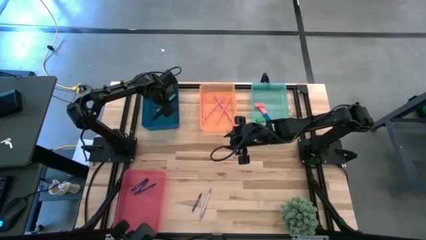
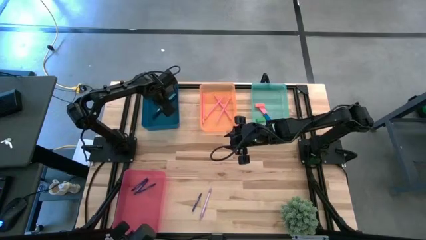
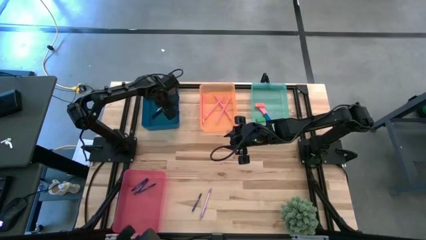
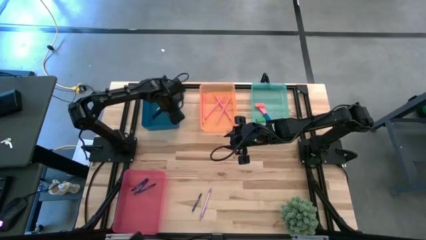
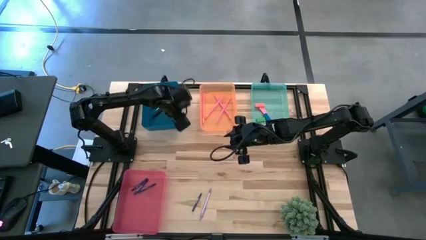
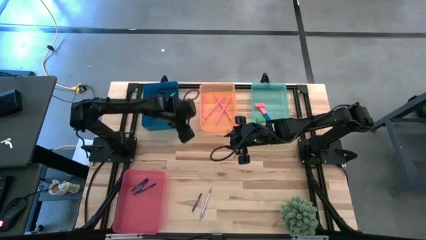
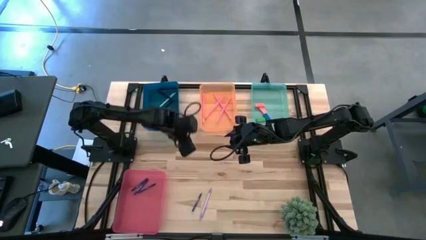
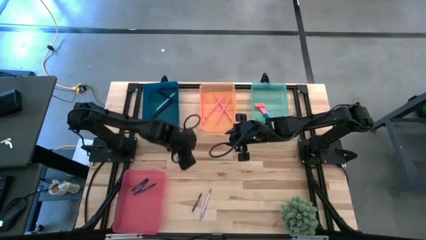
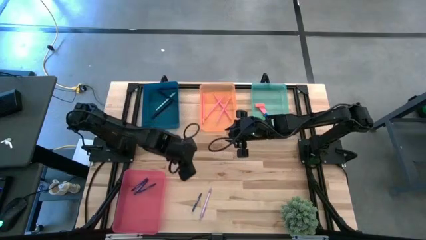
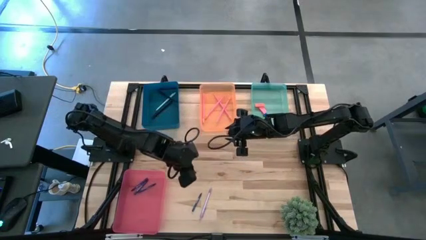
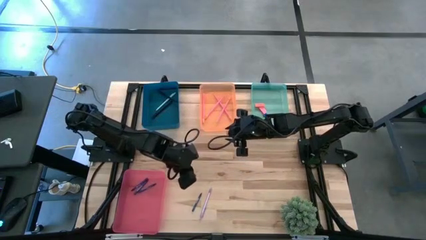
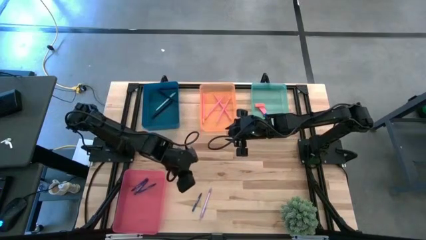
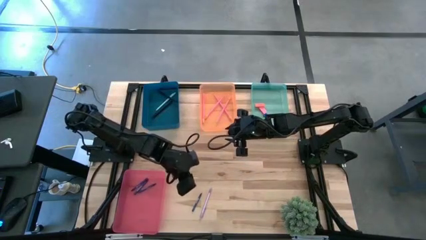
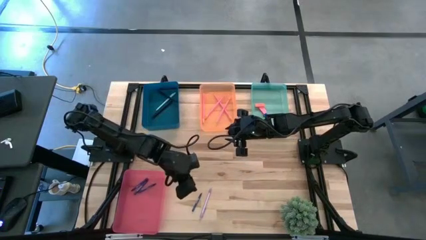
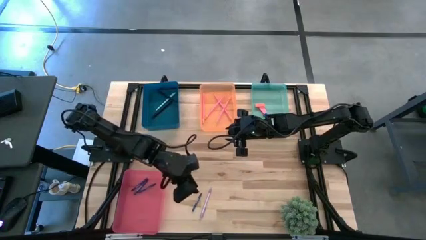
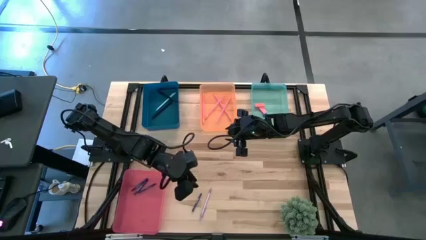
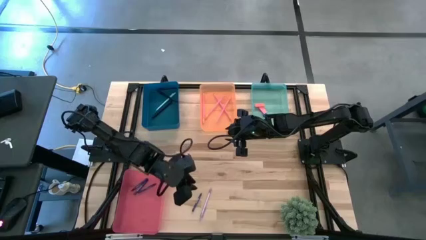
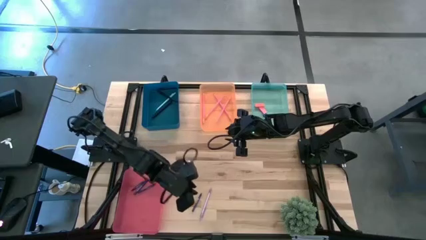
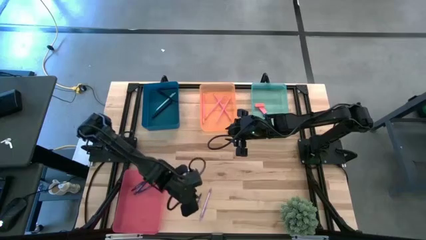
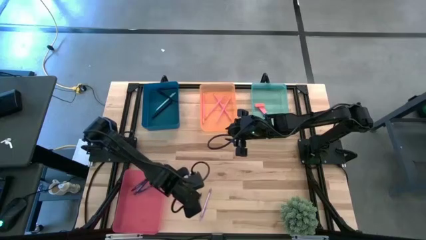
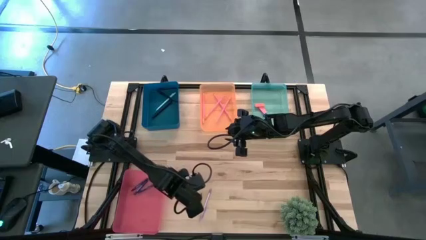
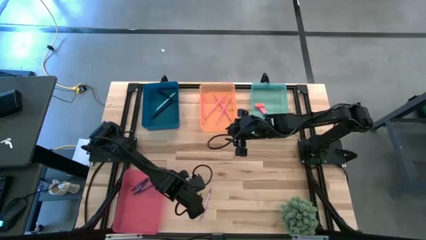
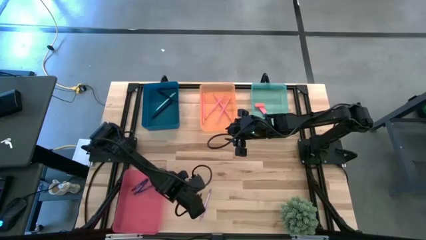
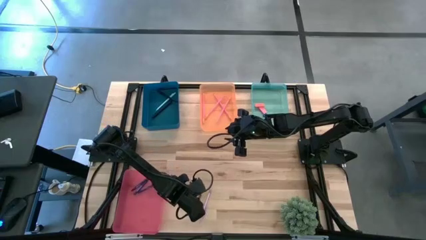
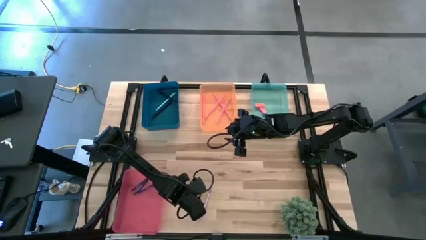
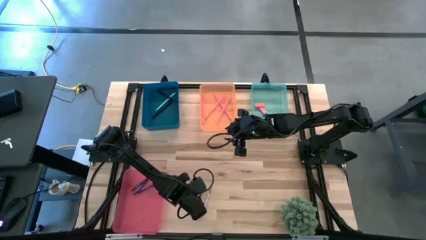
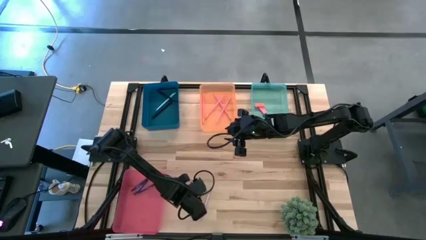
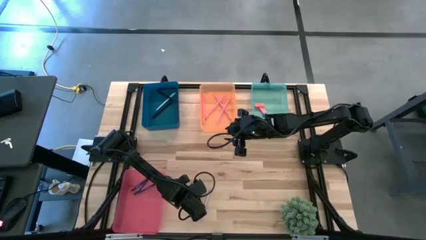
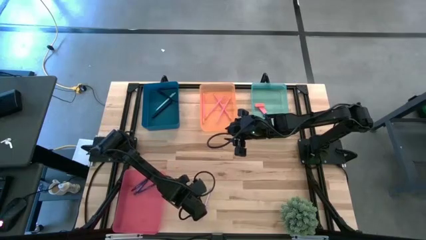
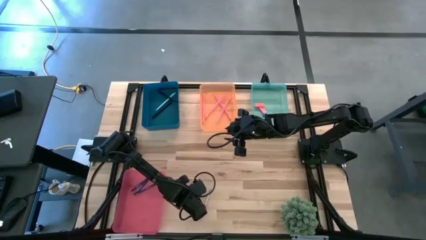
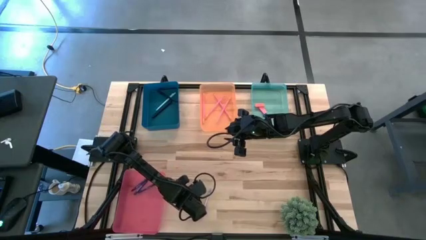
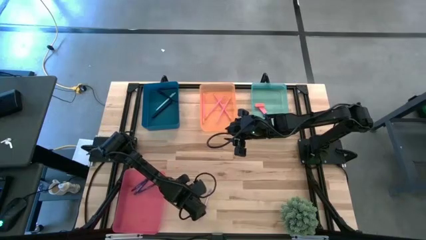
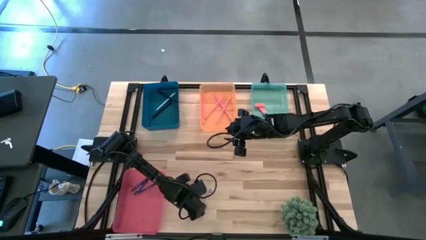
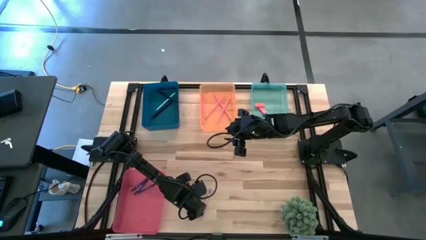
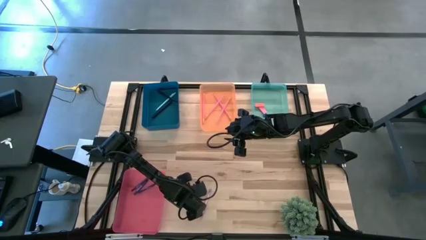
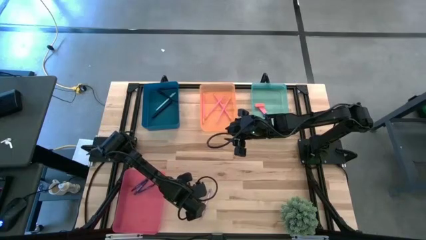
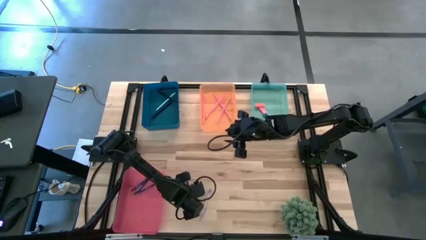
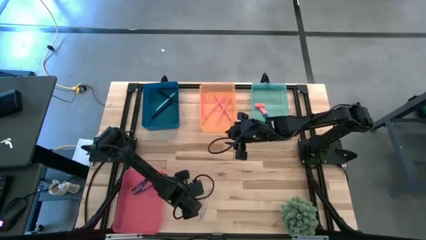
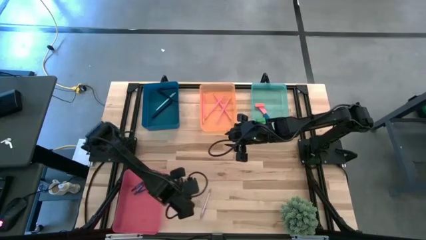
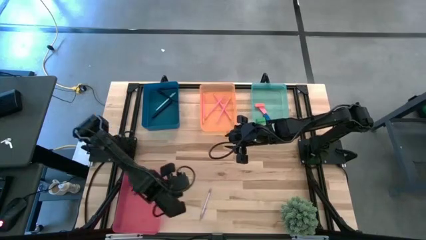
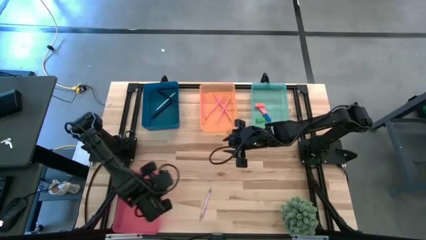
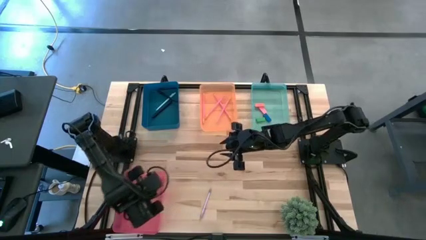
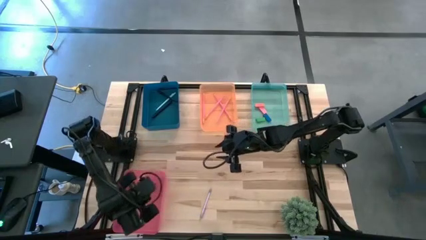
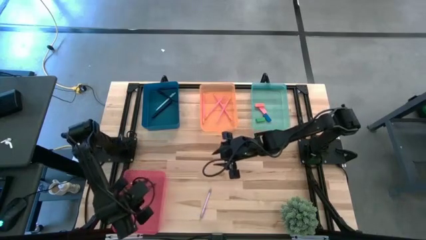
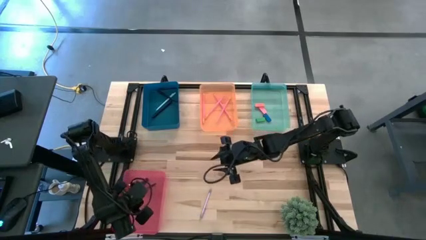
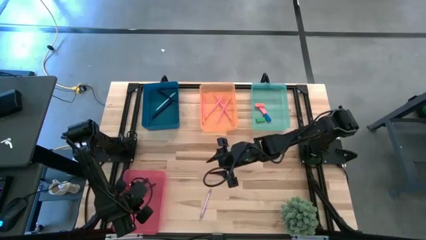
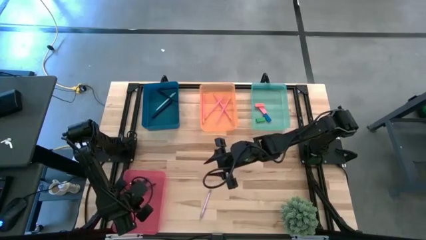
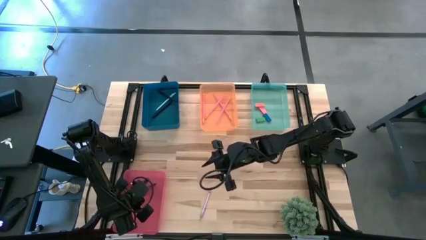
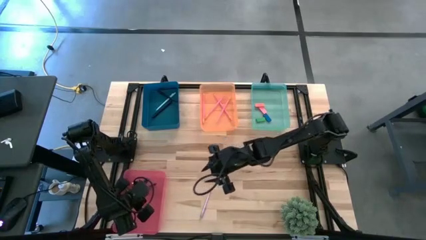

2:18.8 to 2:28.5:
Task: Sort crayons/erasers/pens/pencils in bins
Put the crayon into the pink bin

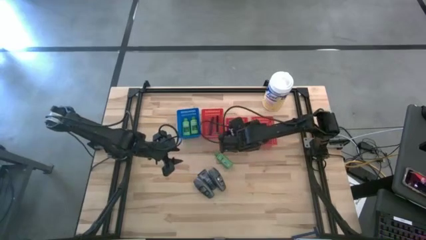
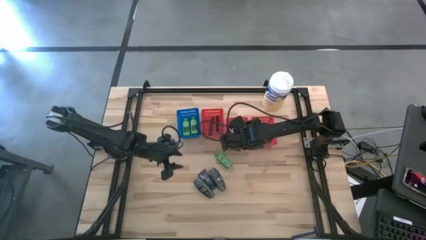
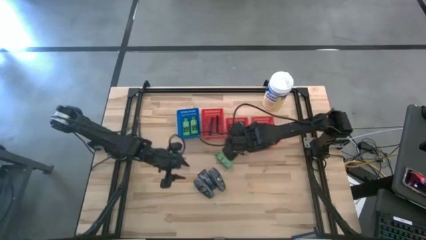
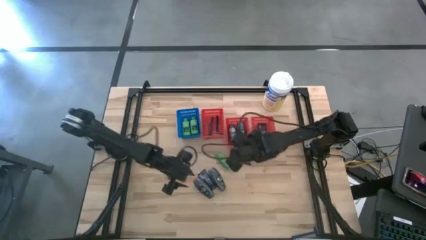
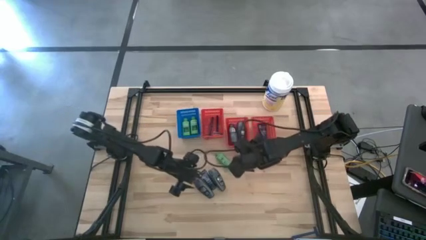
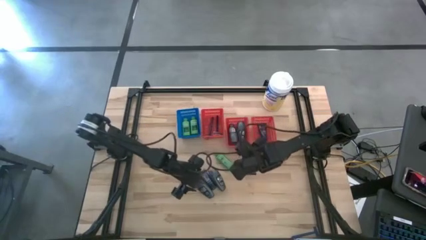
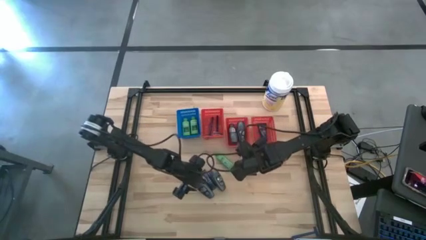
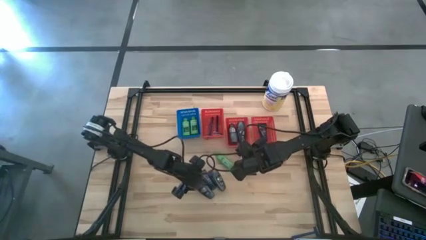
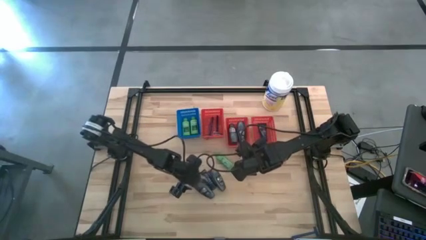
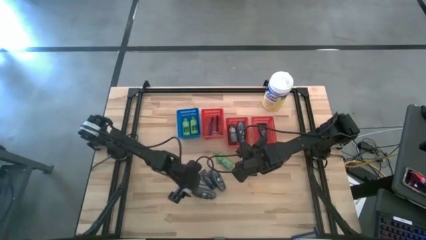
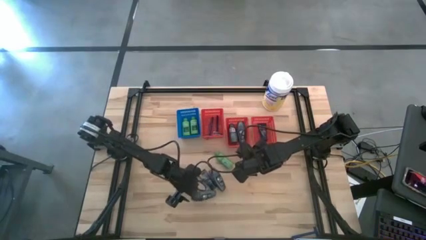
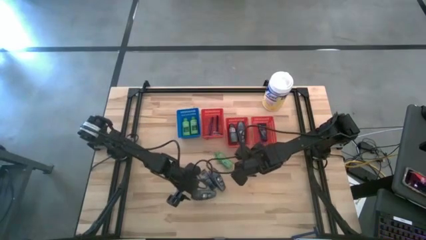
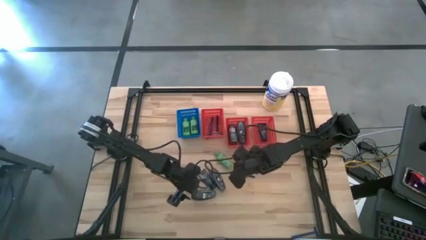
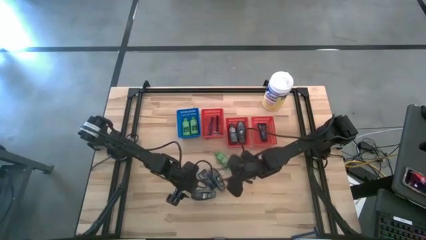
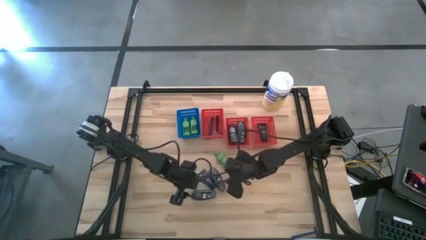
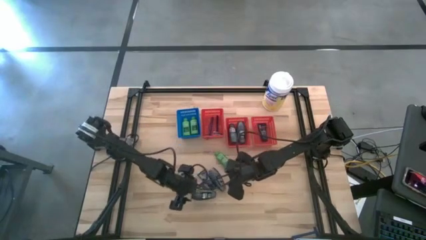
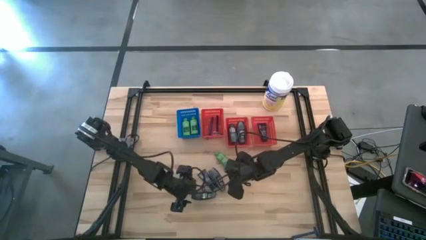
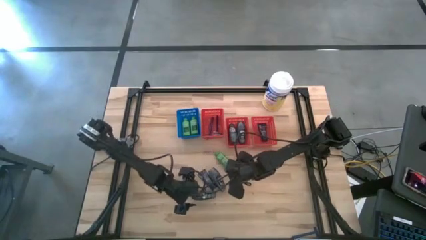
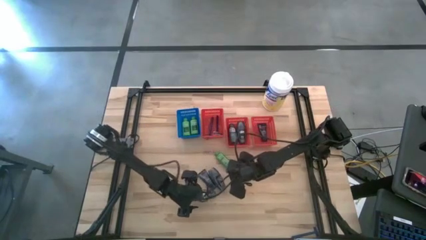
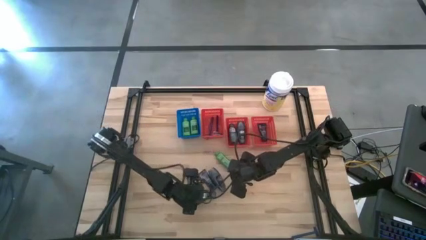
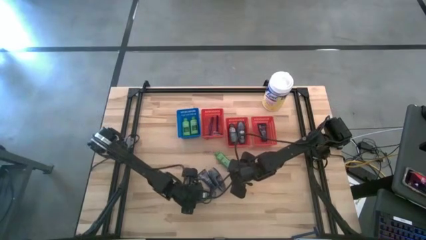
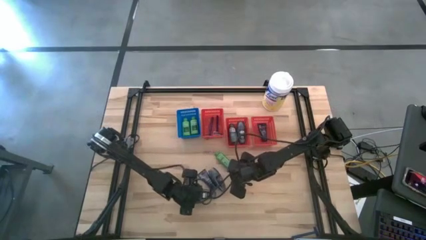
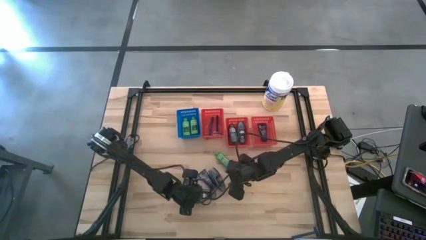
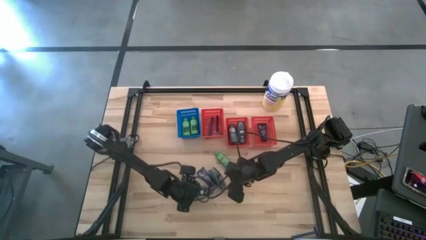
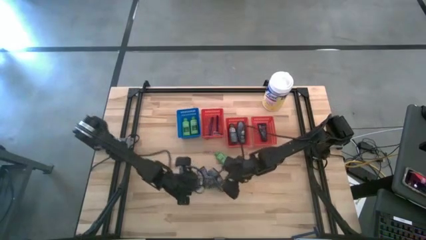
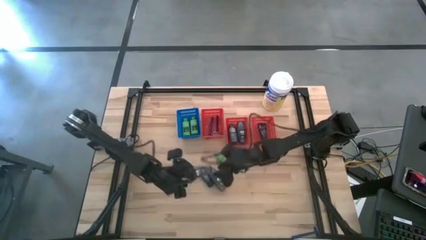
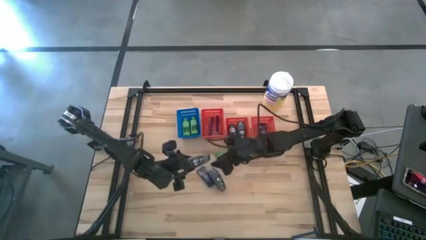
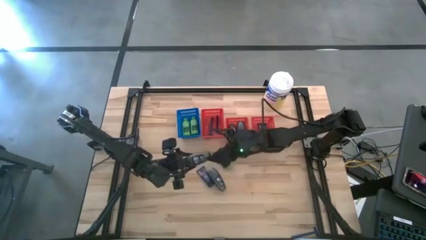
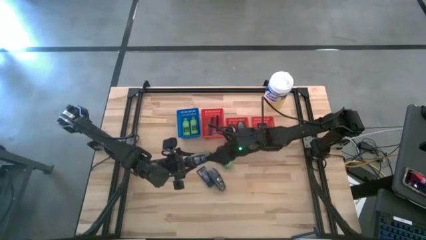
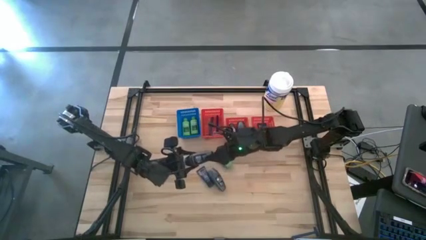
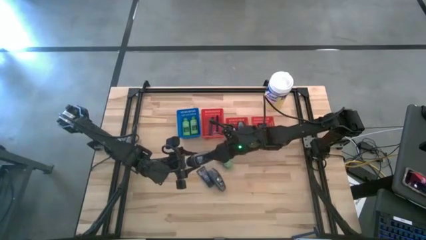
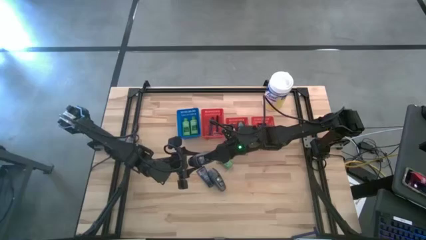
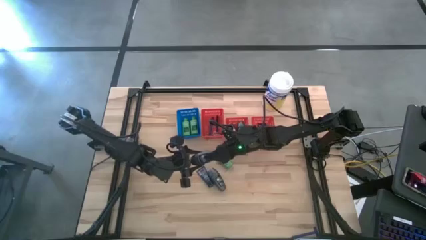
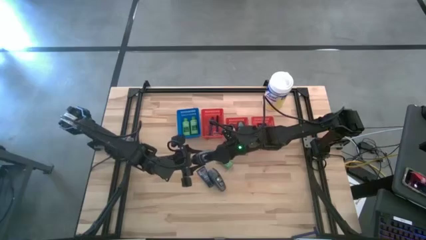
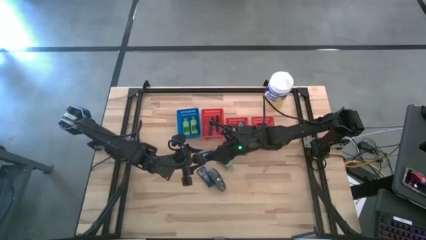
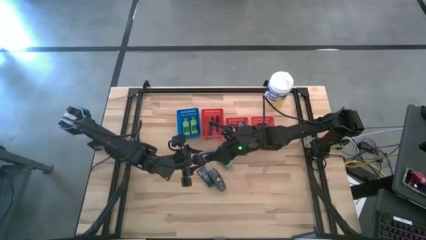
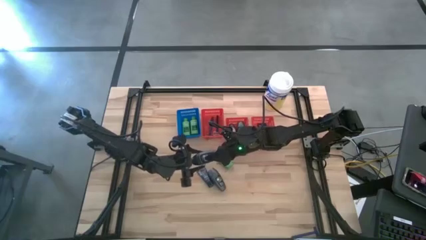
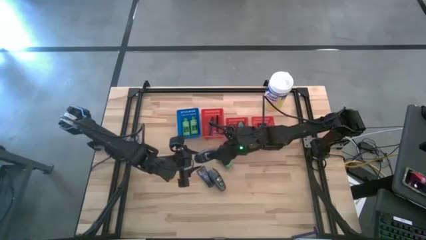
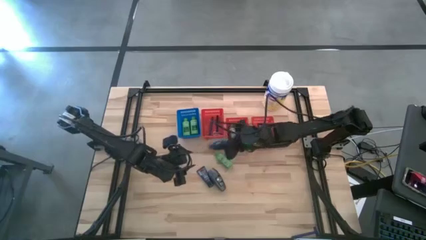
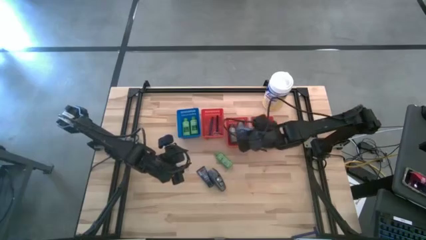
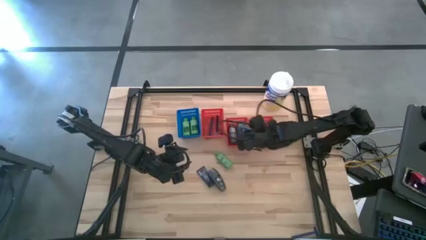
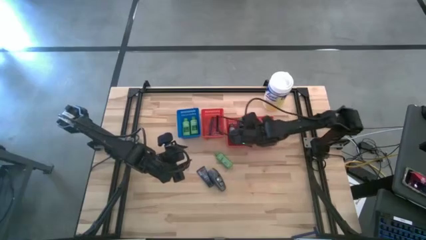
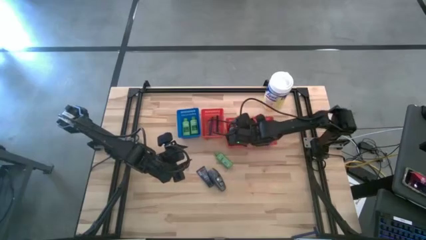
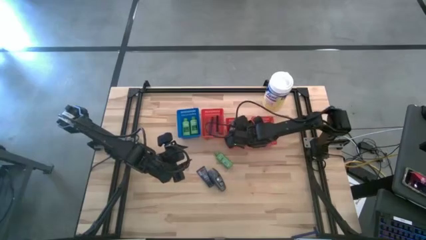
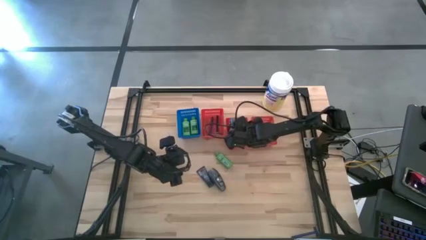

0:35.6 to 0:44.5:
Task: Pick & Place Travel size toiletries
Put the black deodorant into the middle red bin
